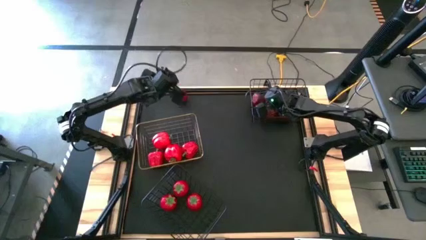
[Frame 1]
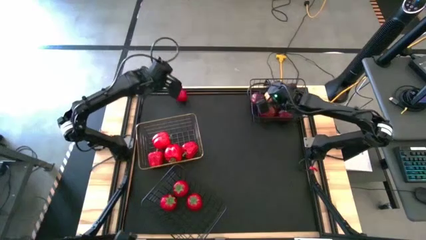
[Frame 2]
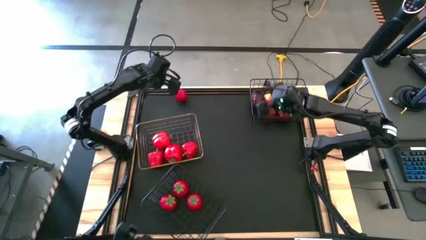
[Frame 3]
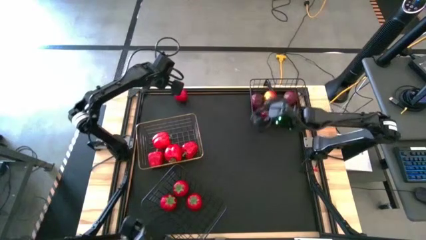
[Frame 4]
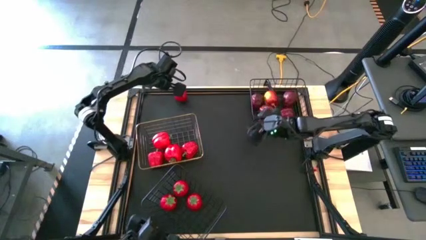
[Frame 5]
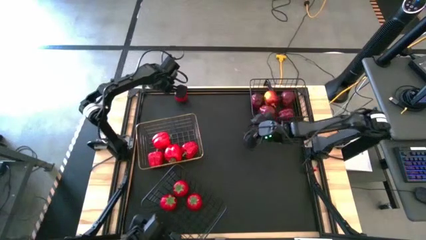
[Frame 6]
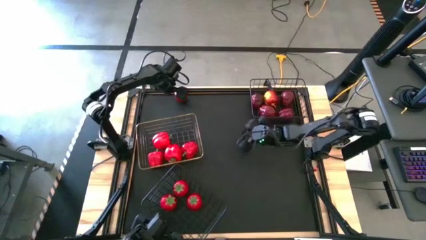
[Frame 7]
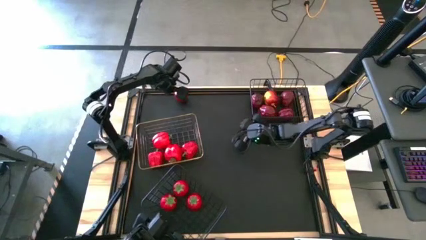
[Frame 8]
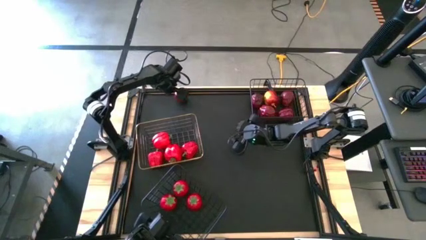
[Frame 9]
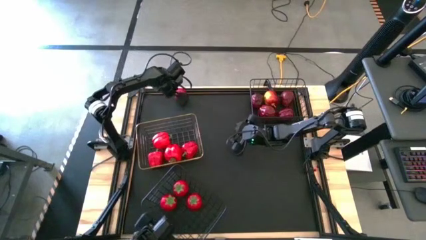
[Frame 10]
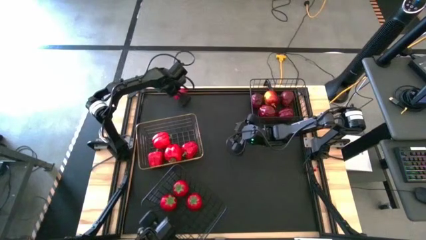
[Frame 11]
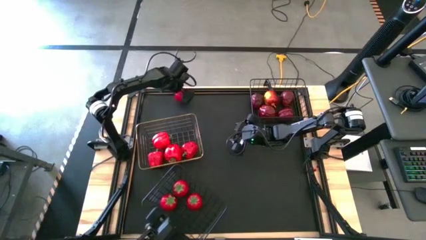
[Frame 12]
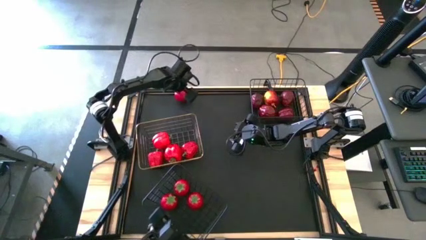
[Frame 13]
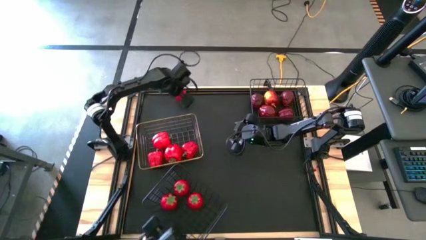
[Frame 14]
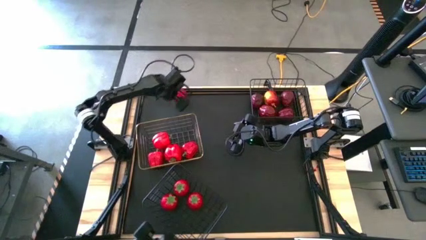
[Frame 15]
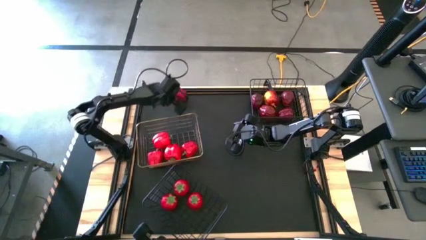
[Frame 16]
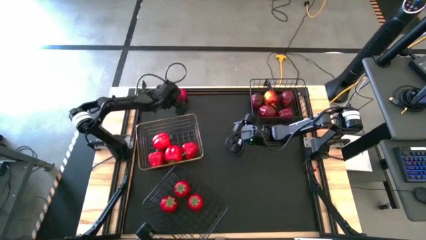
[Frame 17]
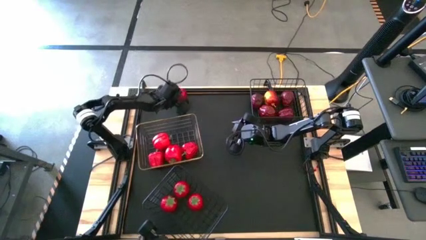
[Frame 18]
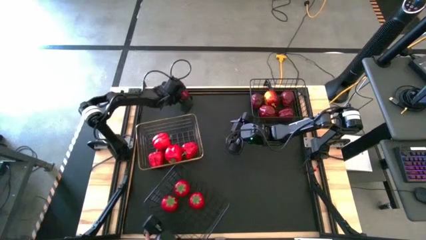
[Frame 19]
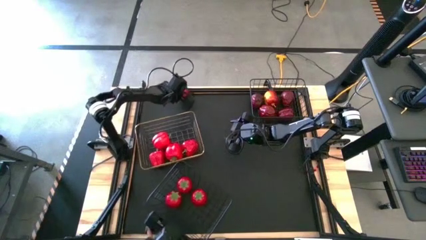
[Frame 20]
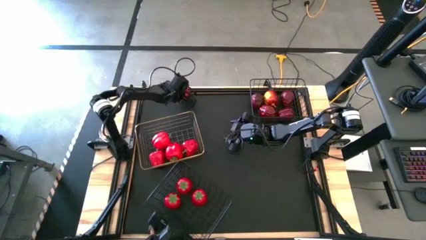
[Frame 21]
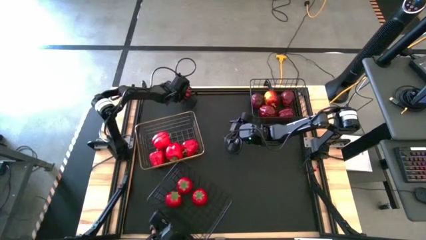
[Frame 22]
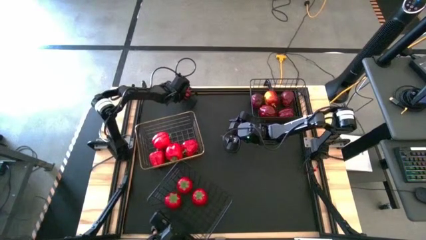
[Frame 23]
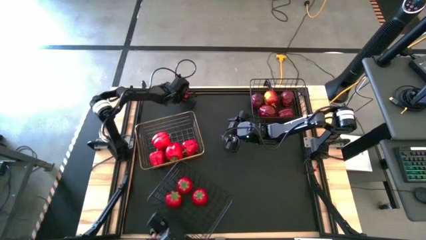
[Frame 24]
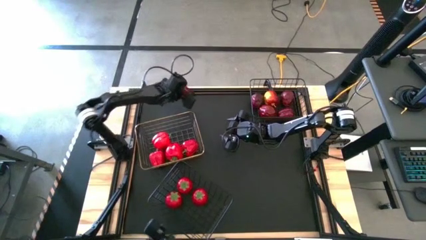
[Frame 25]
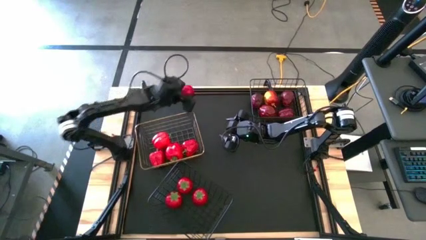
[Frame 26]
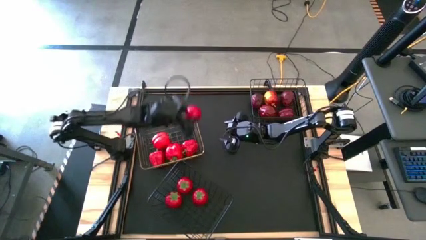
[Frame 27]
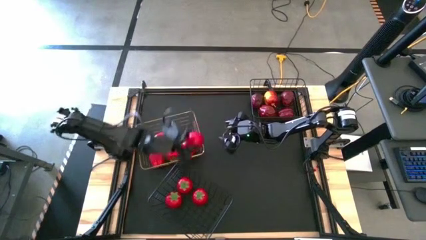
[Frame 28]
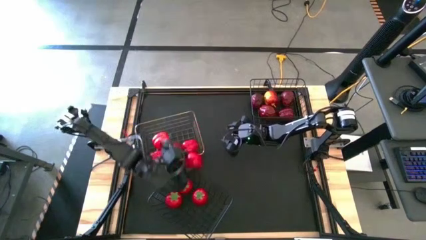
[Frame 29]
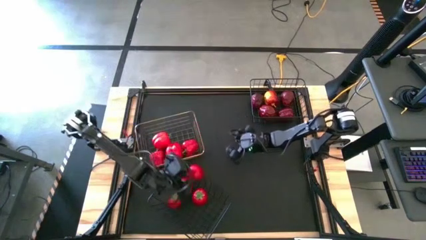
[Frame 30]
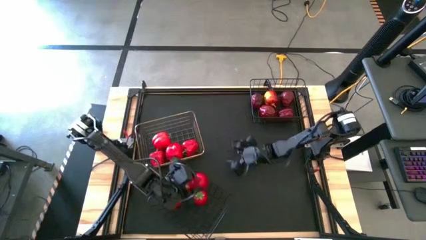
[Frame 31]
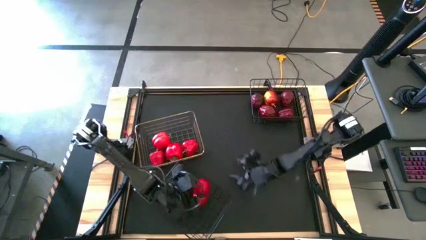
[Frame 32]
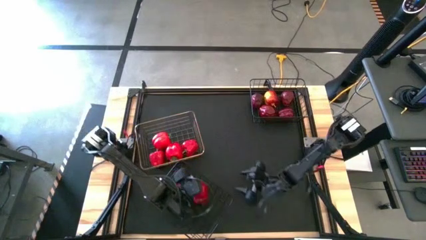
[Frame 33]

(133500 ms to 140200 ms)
Task: Sort produce into baskets
Put the tomato into the left black basket

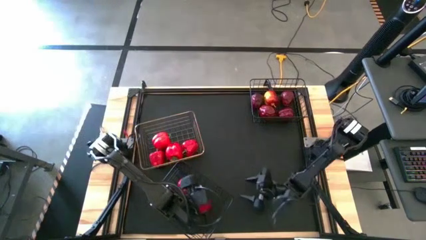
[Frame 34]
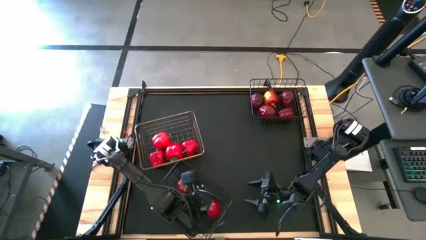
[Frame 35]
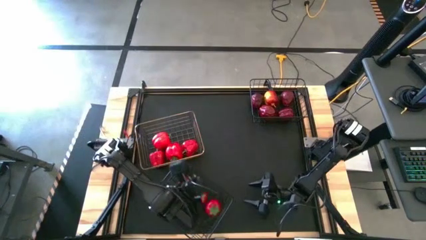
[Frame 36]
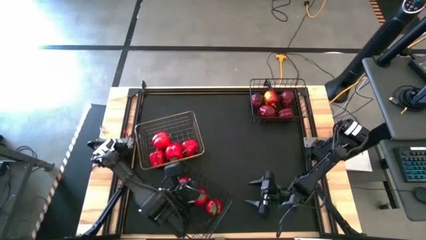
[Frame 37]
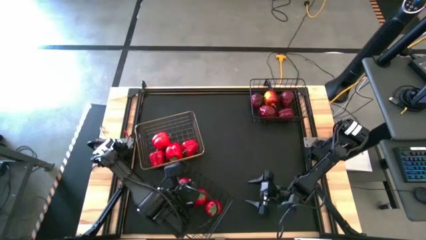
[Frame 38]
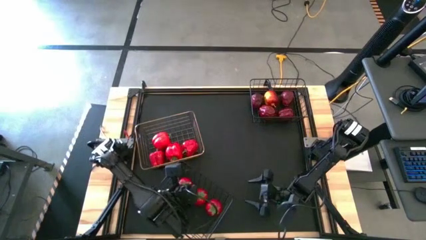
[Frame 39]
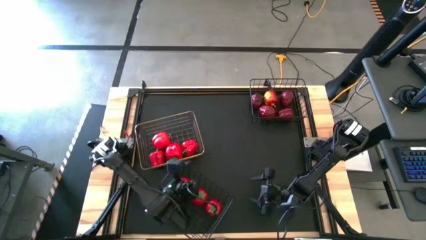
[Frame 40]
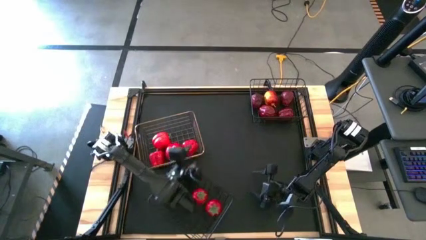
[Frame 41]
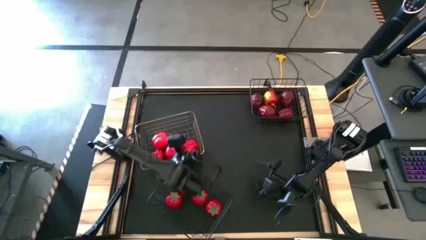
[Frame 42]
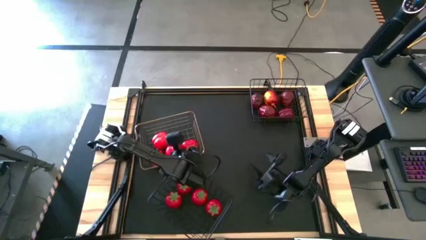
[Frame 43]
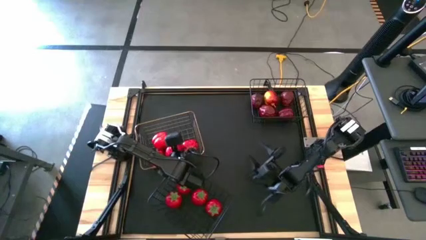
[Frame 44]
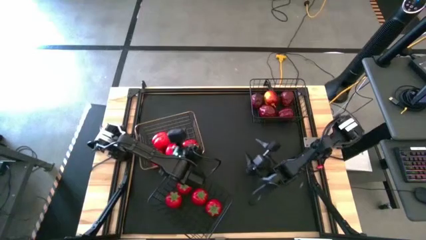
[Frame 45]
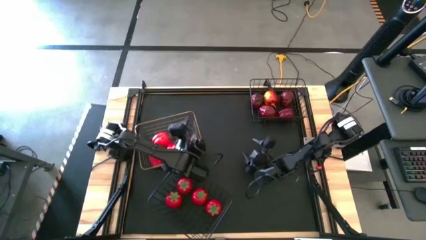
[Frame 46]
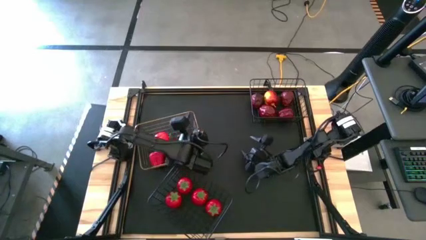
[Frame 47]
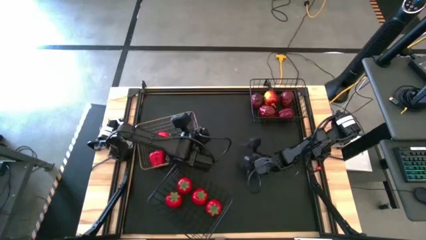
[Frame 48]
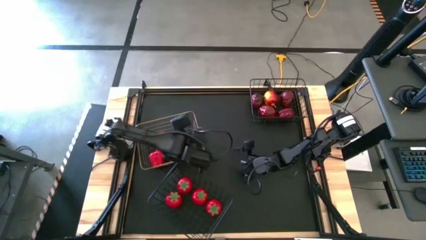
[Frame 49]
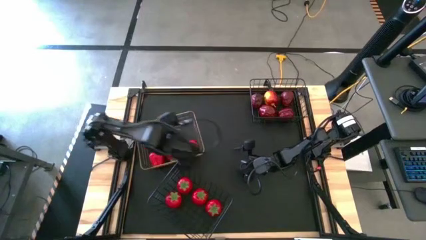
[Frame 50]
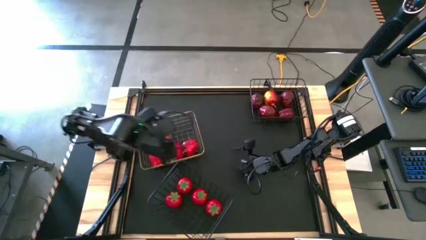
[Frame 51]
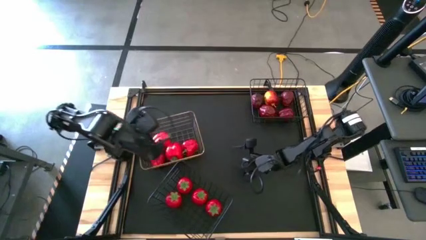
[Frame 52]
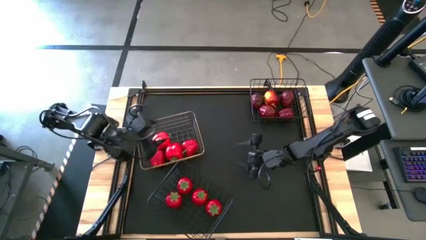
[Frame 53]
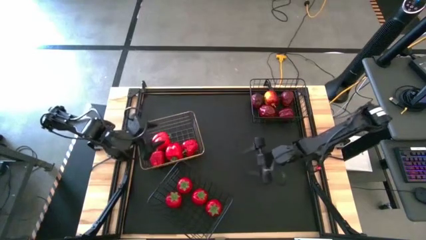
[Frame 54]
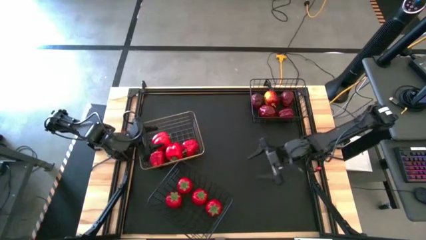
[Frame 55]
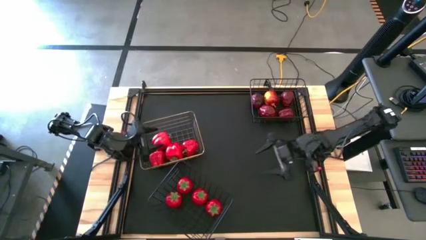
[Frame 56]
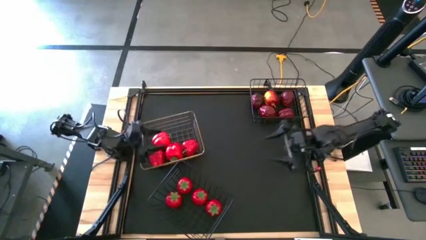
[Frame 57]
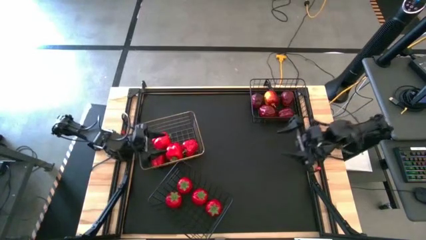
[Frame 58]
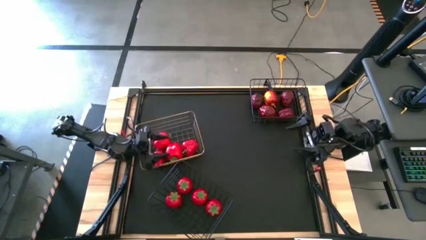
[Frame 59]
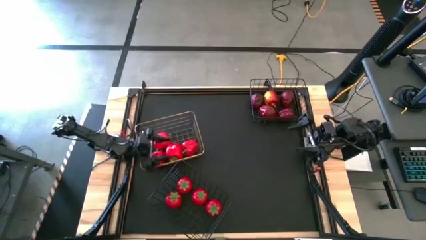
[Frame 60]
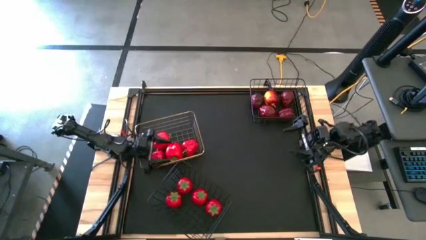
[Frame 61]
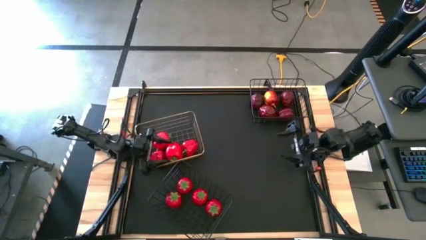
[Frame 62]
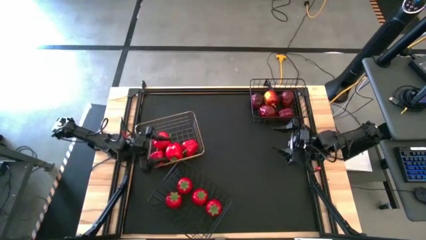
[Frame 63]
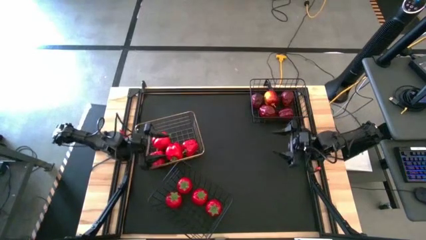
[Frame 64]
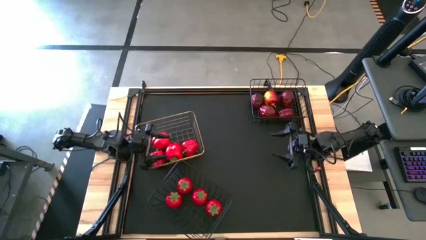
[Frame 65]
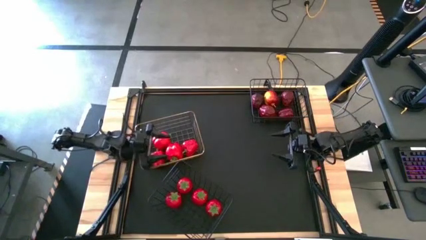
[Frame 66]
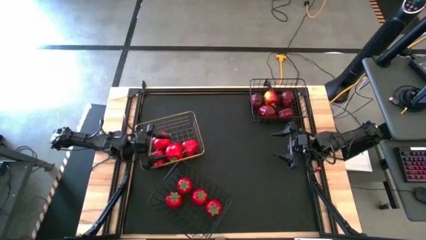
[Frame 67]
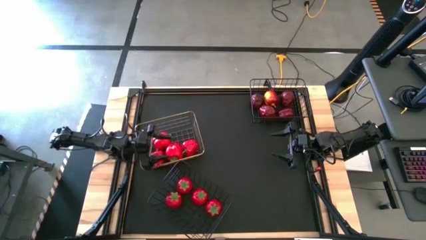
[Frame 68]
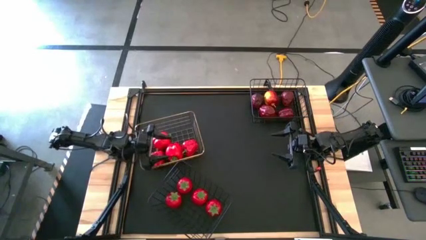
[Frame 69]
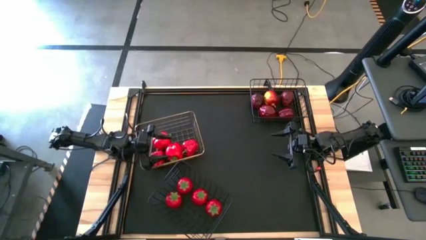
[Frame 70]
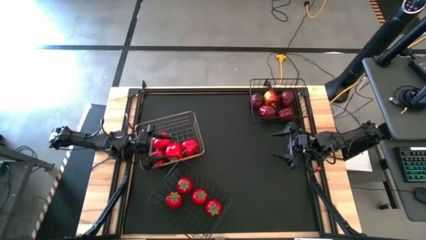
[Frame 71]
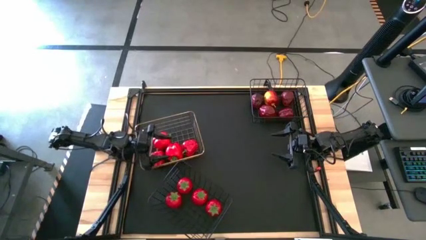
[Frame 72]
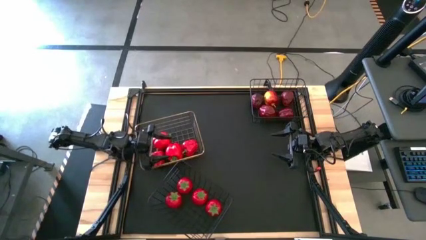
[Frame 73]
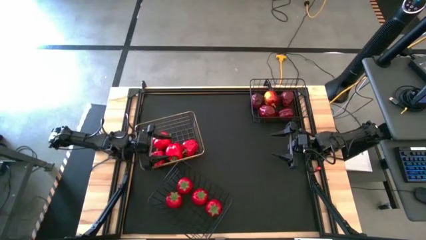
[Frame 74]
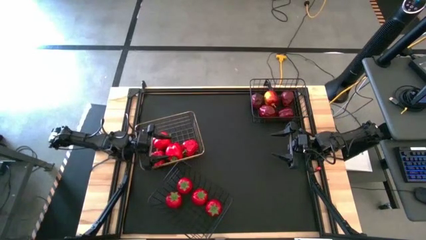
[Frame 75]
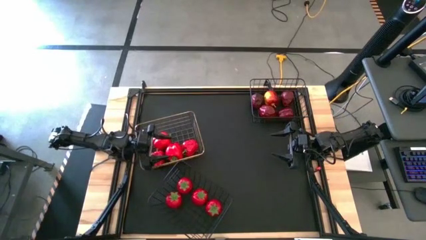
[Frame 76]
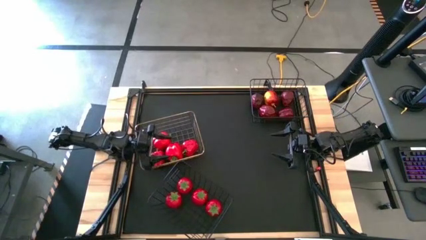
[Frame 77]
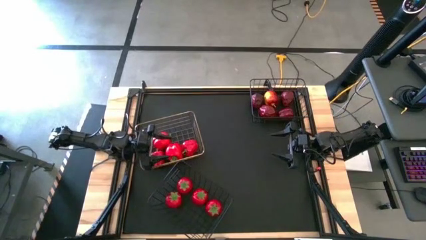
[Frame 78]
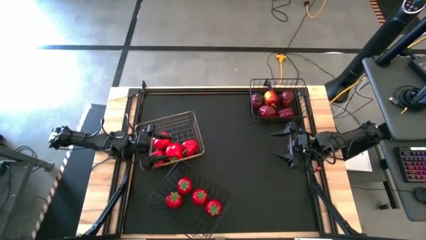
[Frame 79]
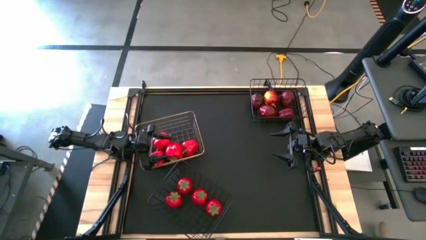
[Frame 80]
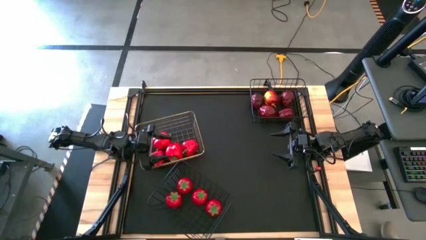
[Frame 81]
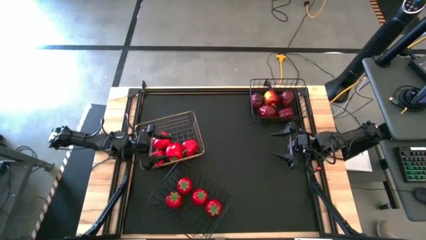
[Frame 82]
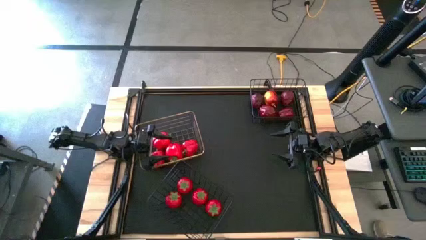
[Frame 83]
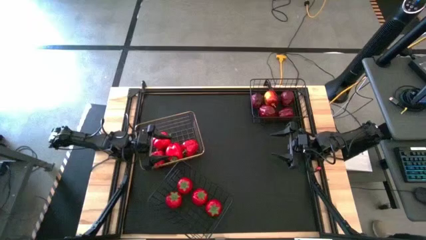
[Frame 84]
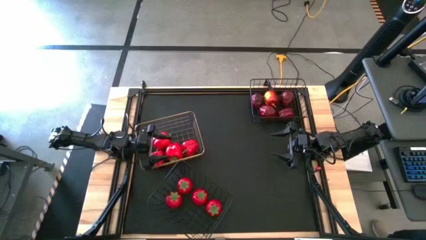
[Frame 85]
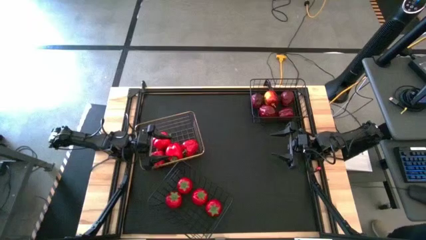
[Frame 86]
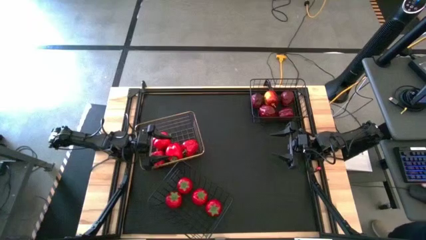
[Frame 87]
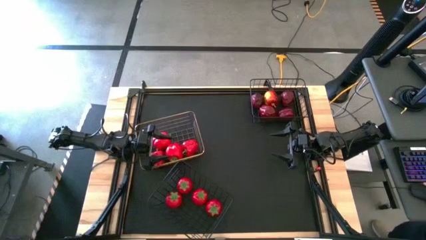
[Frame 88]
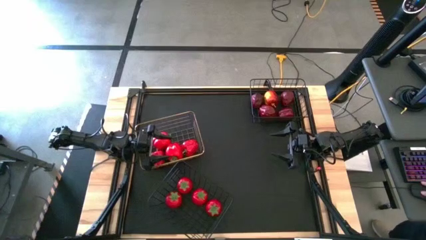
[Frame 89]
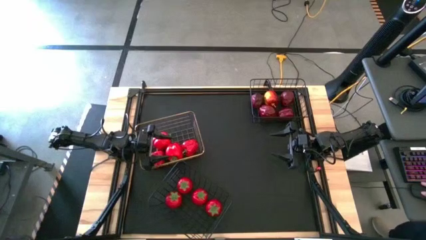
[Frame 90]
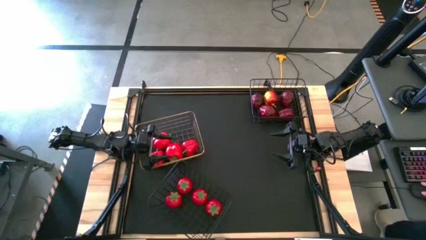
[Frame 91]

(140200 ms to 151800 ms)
Return to Home Position
